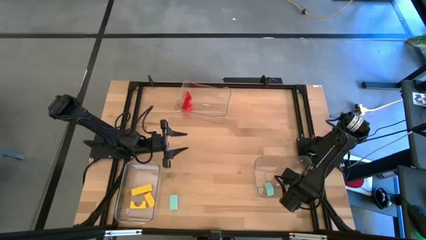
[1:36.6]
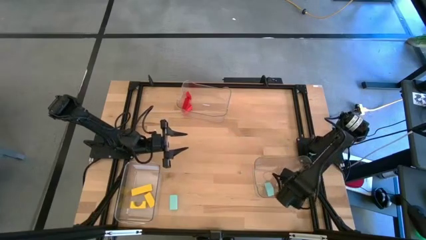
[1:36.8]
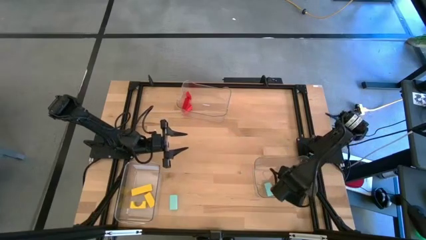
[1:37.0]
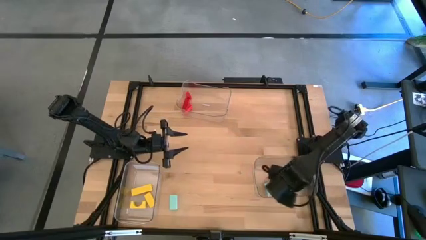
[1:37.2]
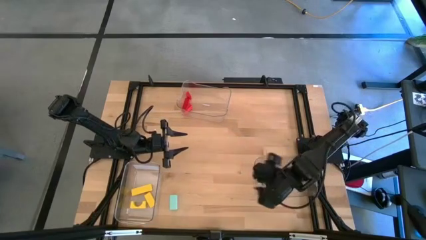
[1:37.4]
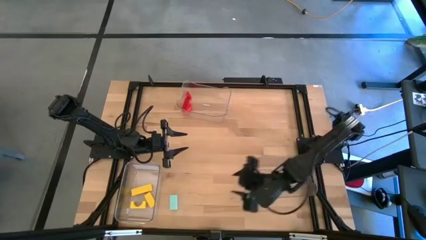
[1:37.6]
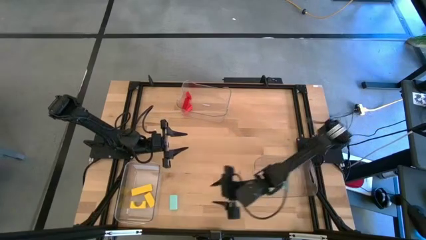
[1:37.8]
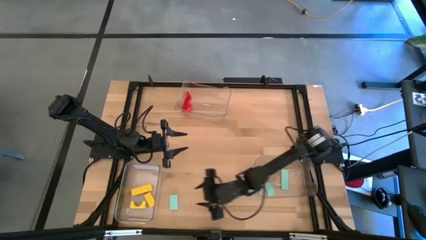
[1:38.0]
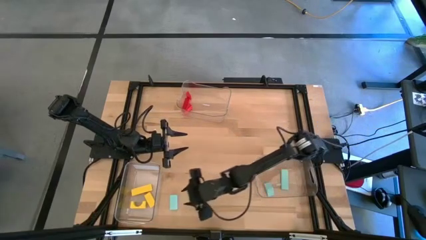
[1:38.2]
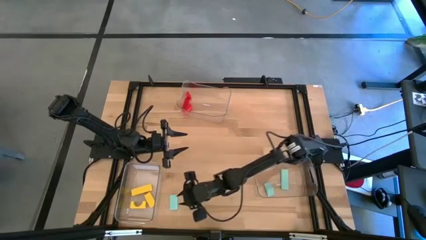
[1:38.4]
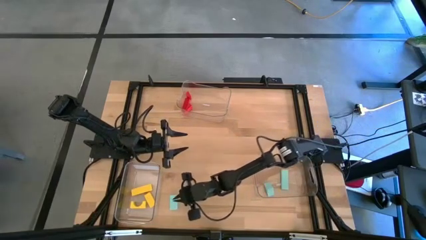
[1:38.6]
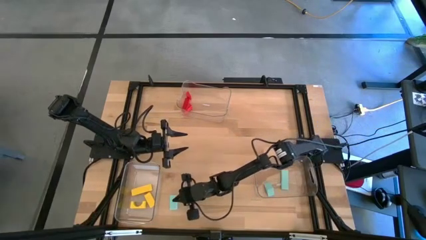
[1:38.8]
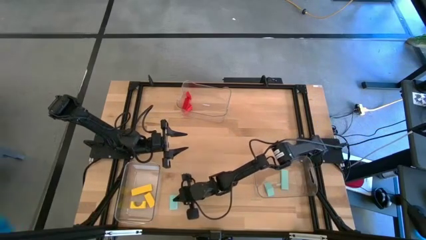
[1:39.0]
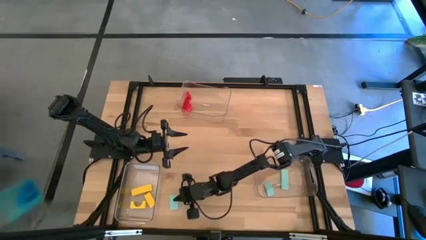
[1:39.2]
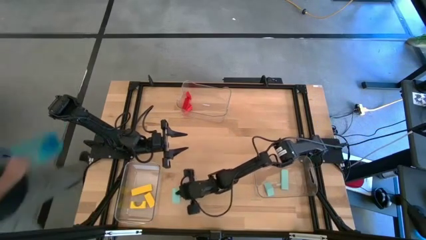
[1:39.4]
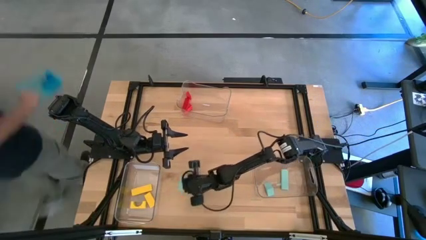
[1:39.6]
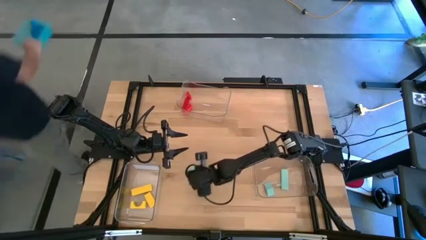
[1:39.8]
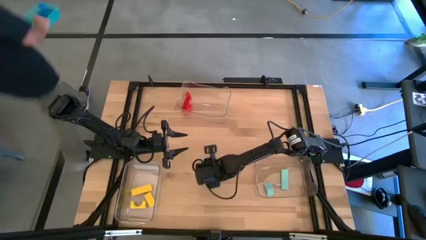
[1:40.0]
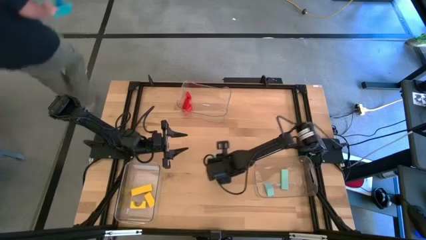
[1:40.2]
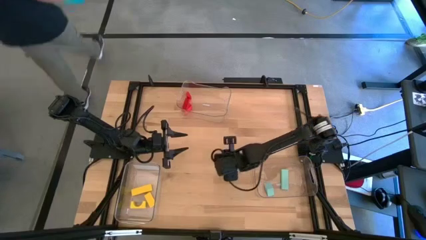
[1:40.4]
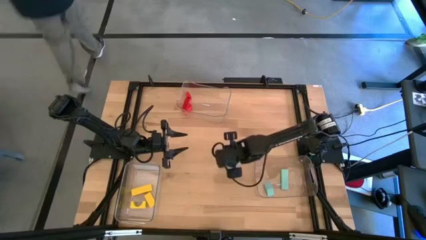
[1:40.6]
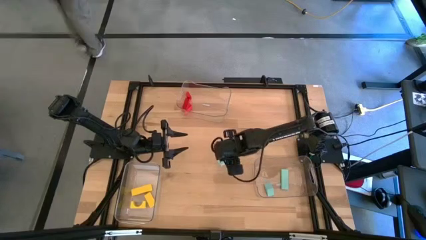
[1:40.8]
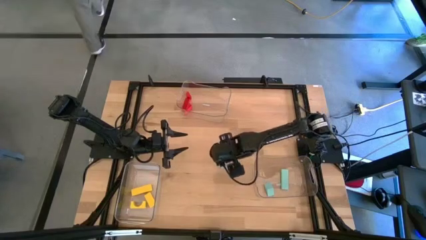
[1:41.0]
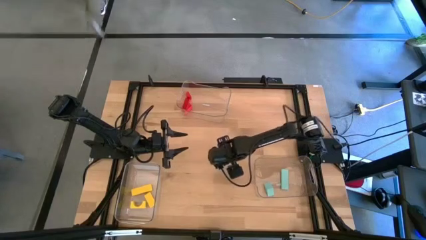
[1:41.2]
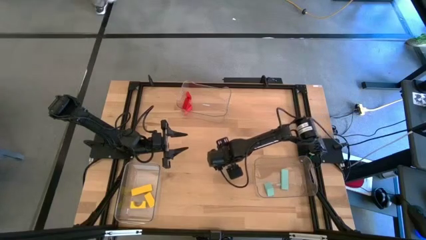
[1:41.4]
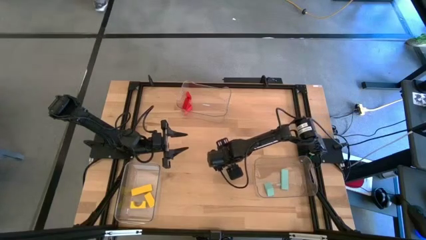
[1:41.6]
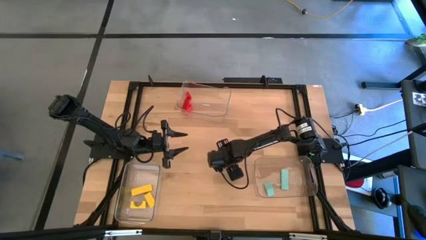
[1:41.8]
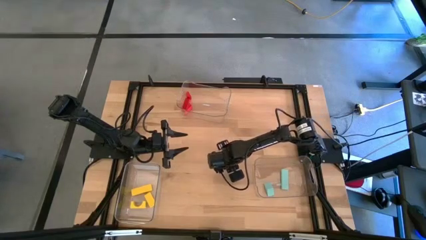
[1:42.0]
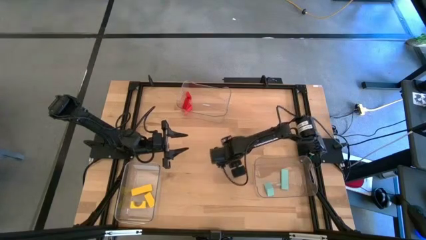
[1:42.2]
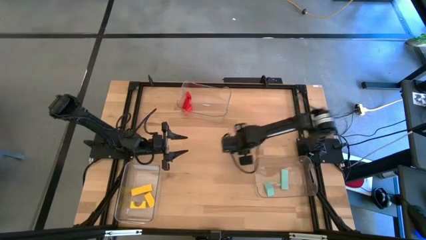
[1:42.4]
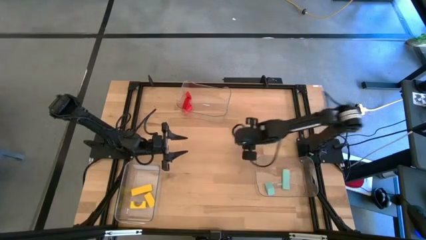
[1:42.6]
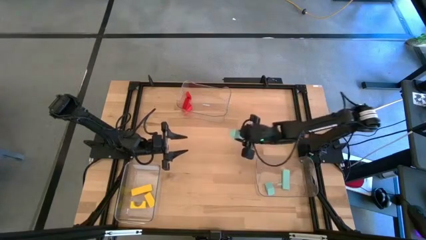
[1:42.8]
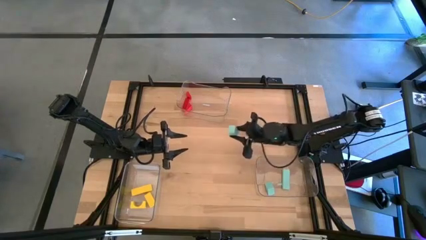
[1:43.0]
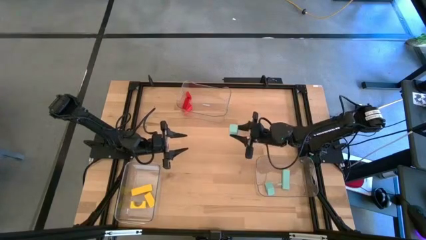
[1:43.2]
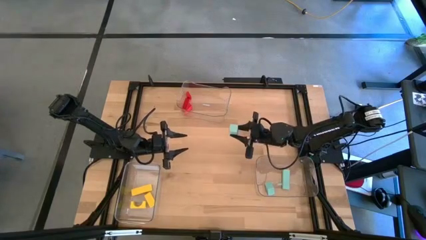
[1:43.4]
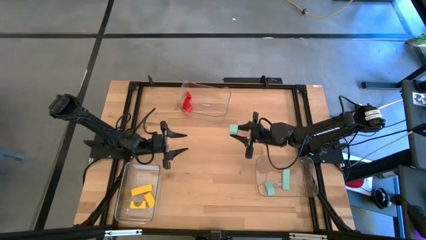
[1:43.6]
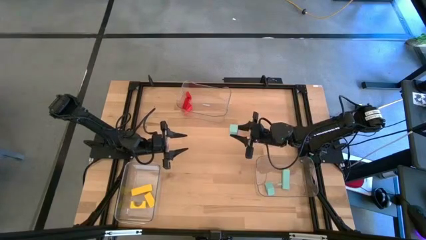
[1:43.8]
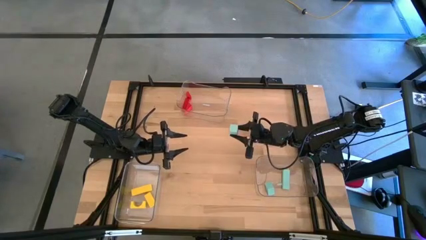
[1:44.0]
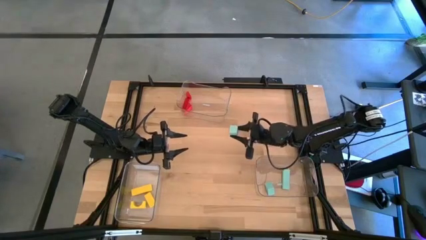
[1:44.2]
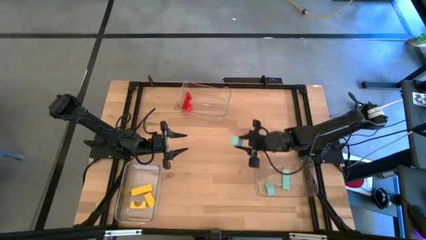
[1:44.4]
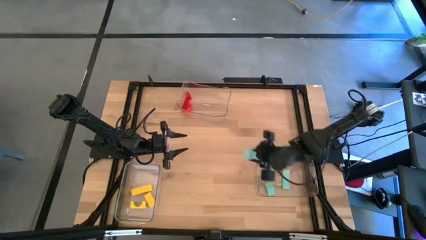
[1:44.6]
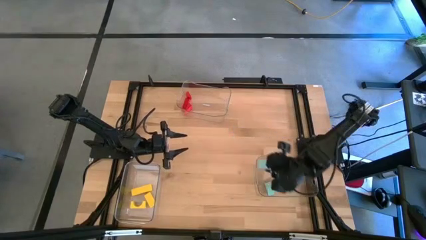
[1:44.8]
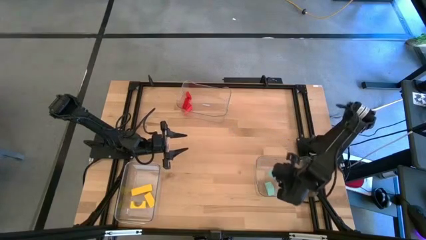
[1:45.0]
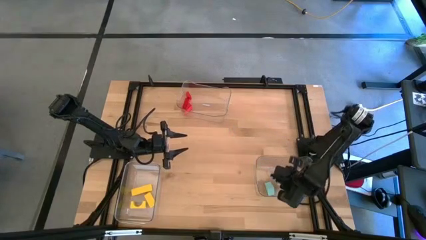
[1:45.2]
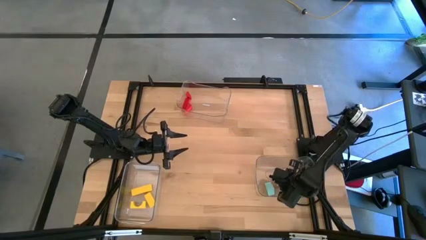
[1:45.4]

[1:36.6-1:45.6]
Task: Sort & place blocks by color
Put the blue block into the bottom right transparent bin

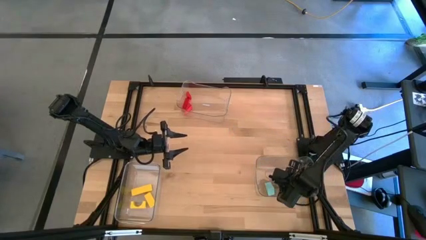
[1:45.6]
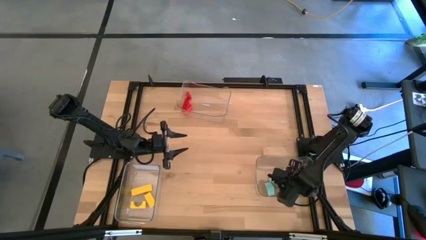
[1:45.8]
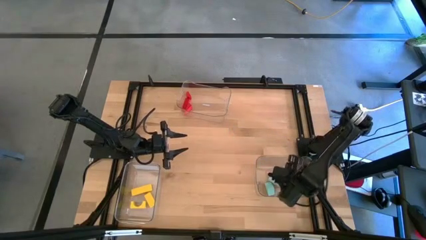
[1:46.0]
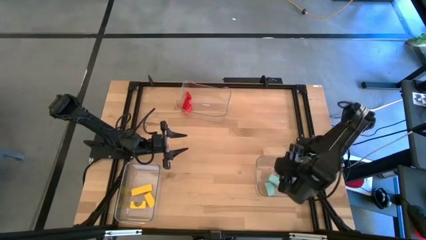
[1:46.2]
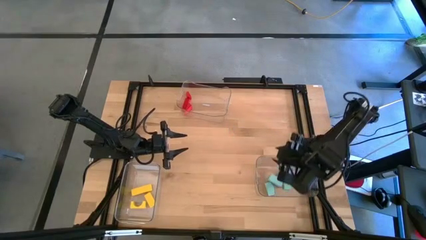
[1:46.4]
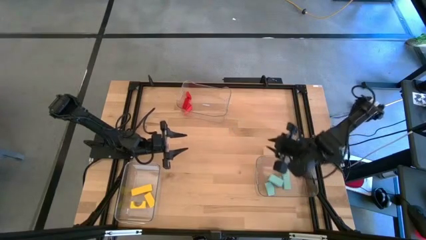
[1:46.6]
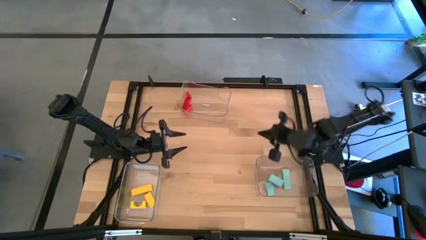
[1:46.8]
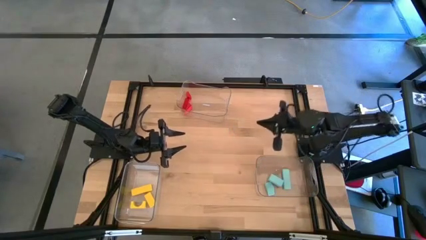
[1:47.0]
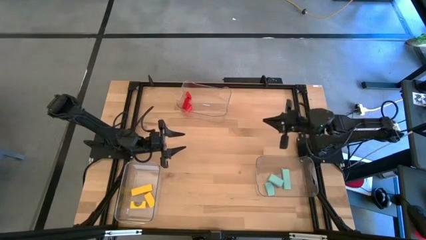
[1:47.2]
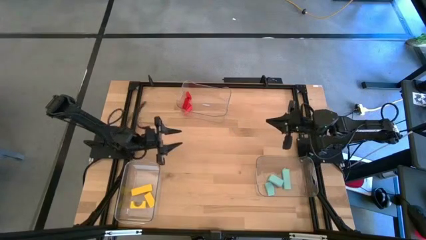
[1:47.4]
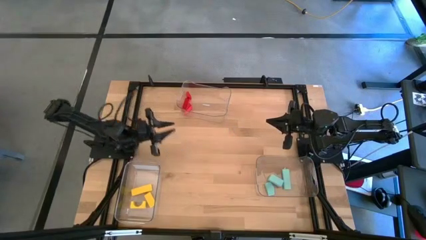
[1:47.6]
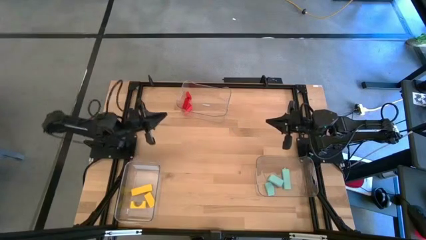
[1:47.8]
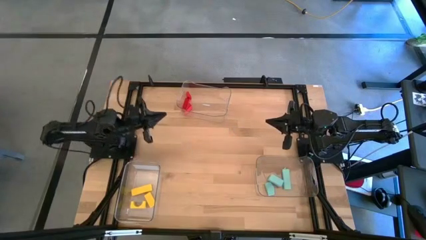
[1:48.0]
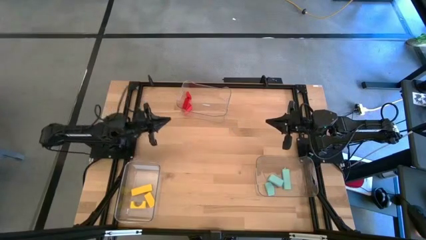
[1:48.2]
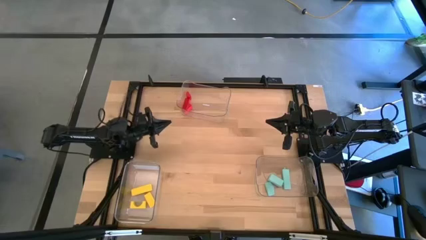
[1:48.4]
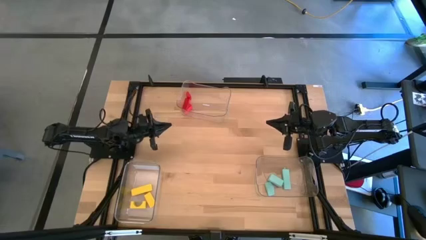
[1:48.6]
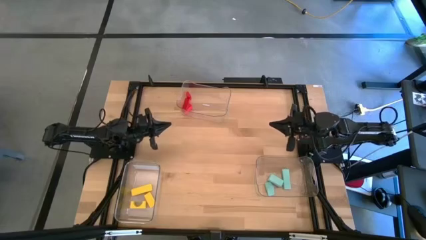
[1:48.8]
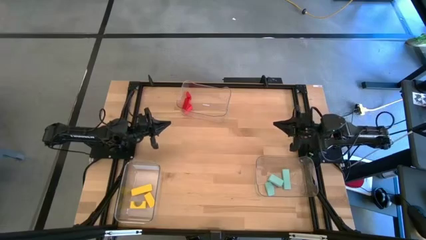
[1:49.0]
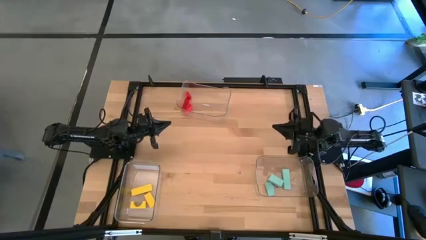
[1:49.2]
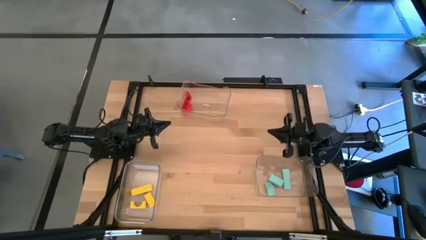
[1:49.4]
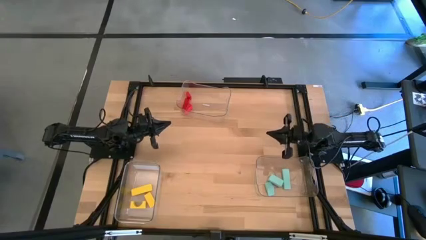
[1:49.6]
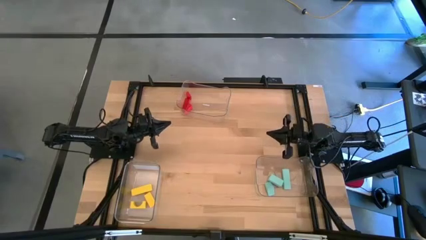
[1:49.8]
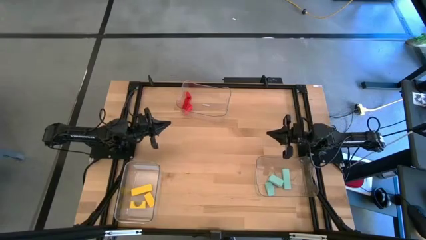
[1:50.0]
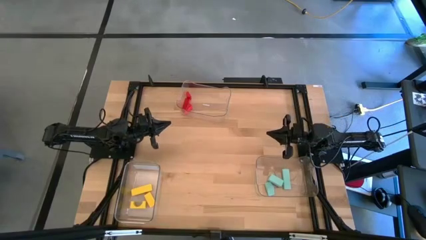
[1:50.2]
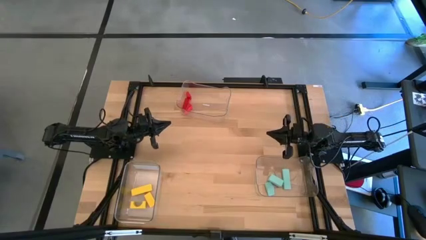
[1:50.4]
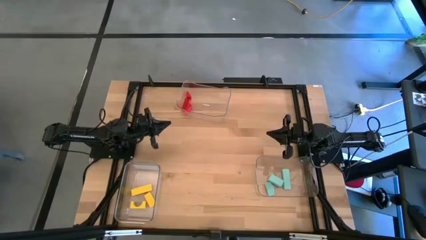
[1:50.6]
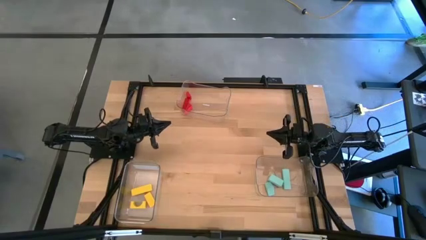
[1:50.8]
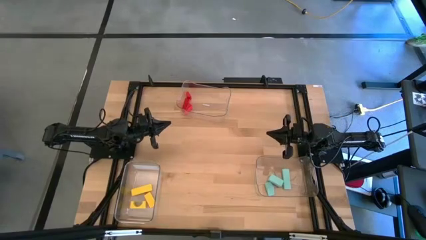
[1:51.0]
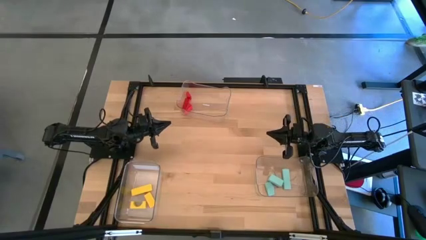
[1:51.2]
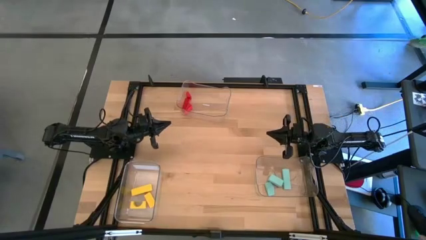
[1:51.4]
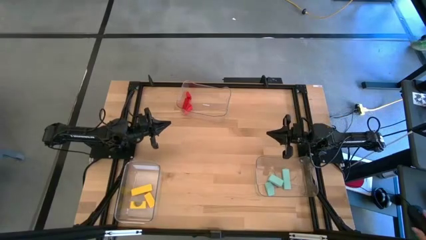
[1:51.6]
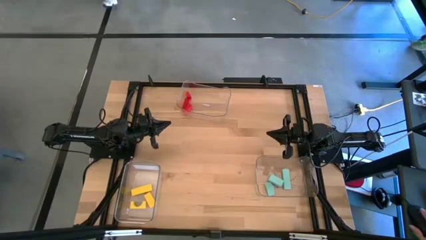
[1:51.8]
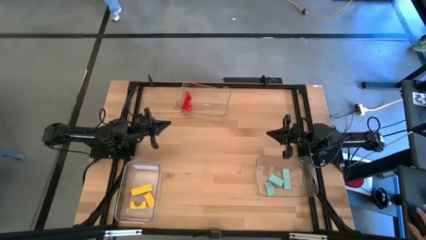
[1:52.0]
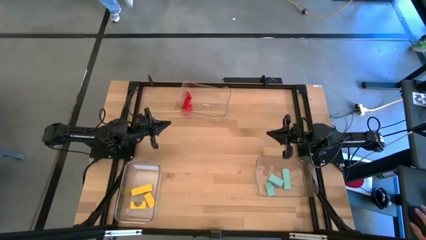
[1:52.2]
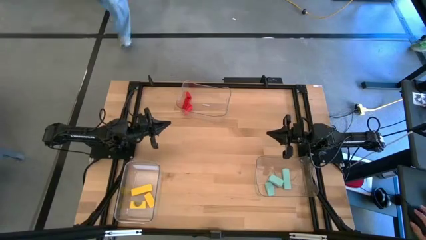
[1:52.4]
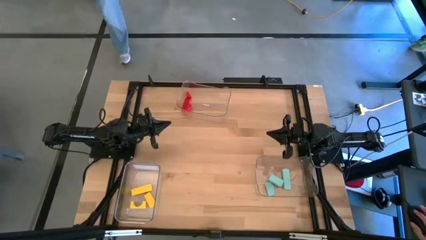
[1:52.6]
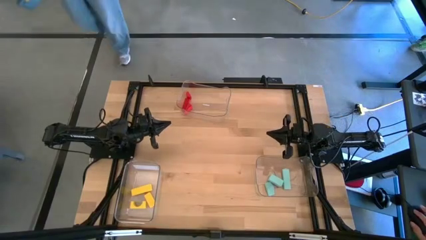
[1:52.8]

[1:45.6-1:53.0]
Return to Home Position
